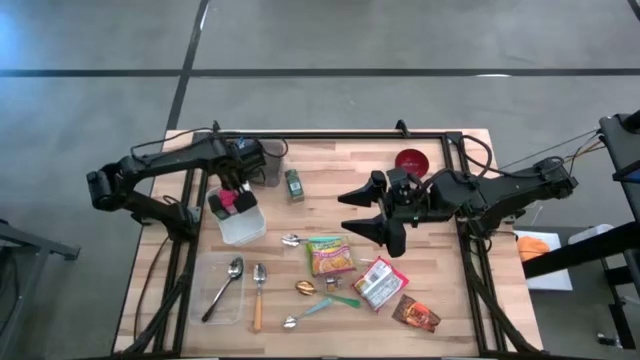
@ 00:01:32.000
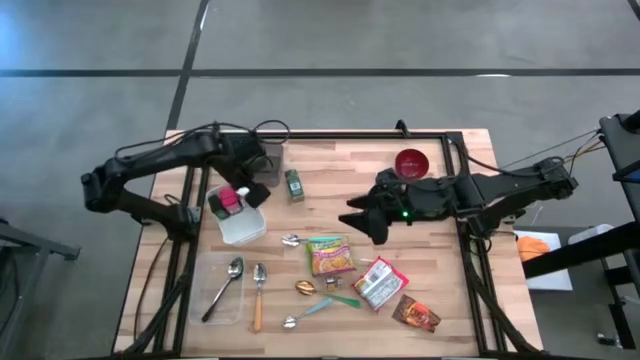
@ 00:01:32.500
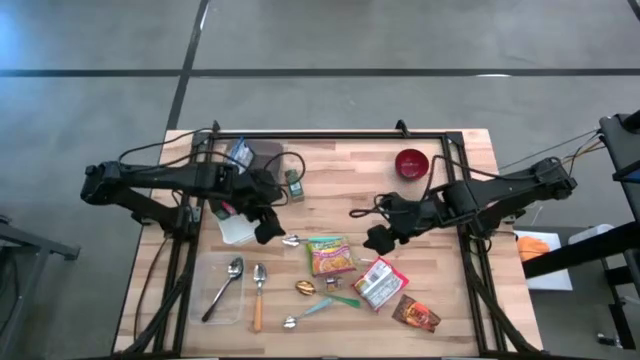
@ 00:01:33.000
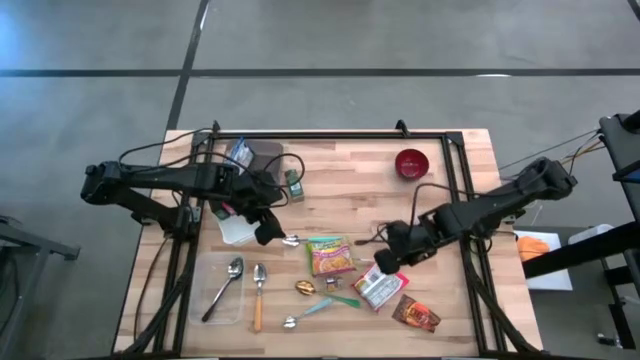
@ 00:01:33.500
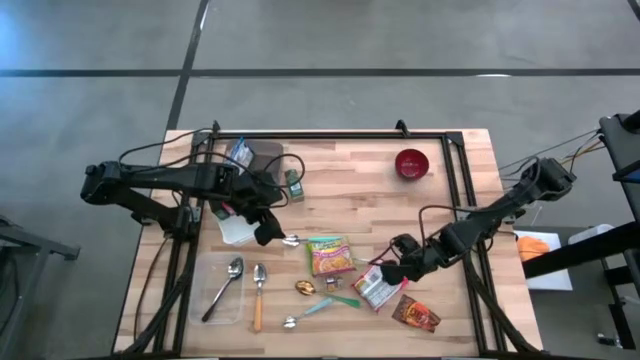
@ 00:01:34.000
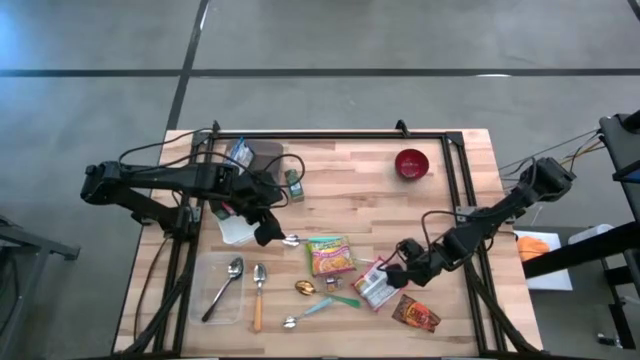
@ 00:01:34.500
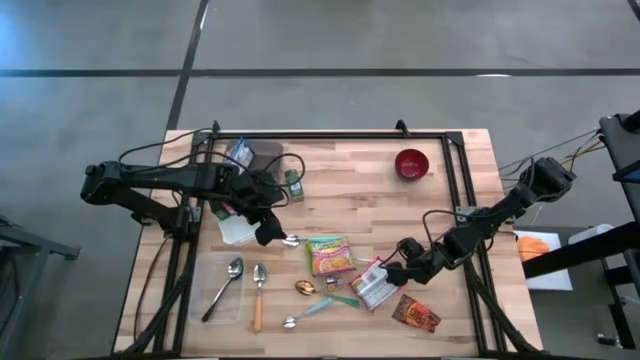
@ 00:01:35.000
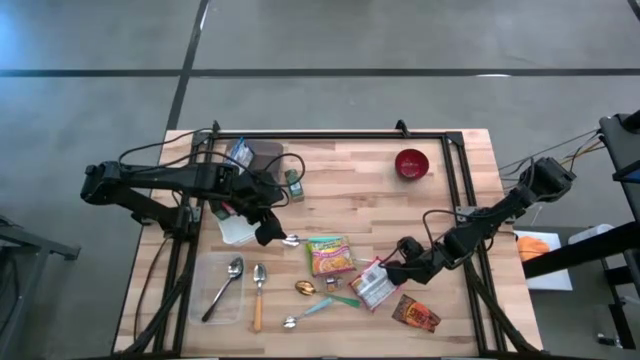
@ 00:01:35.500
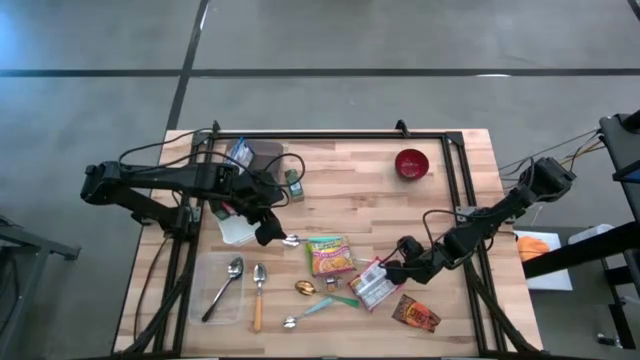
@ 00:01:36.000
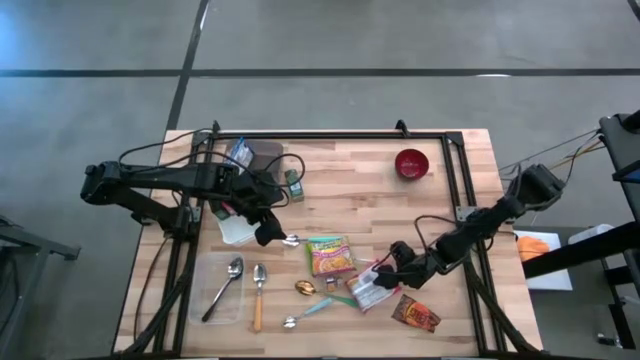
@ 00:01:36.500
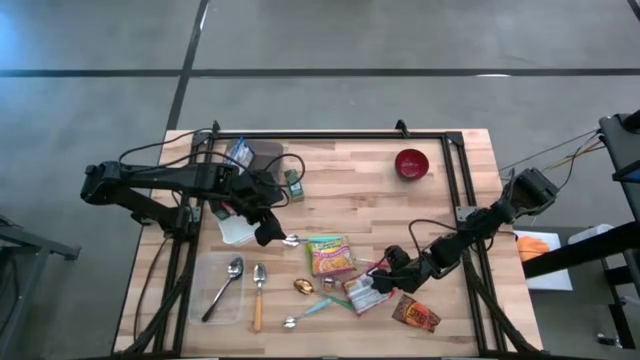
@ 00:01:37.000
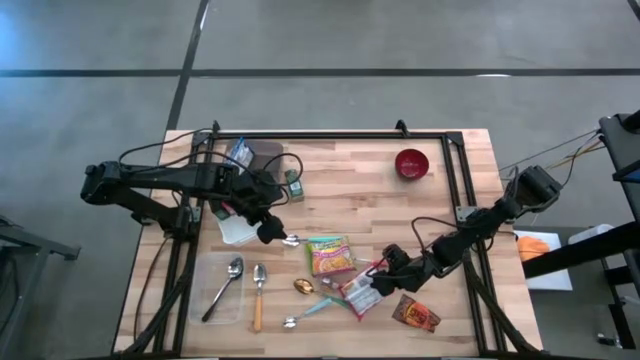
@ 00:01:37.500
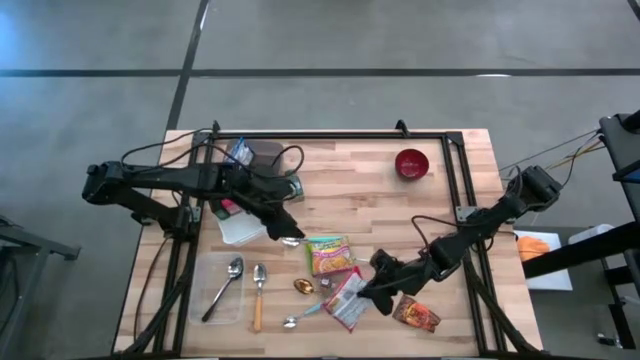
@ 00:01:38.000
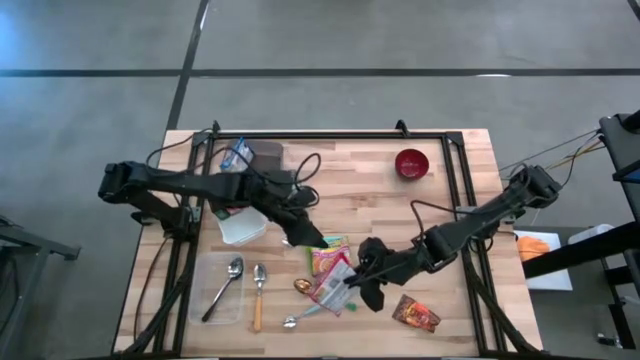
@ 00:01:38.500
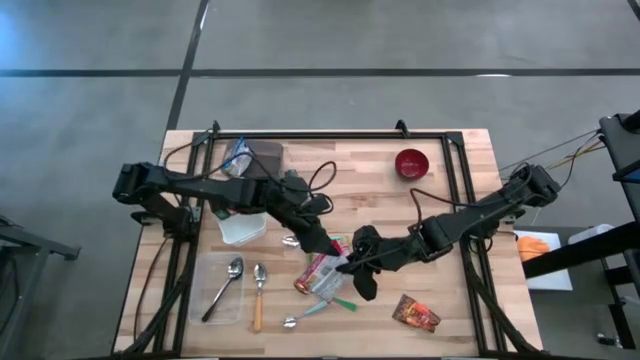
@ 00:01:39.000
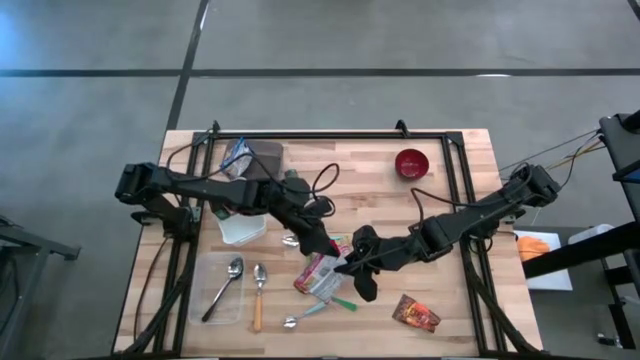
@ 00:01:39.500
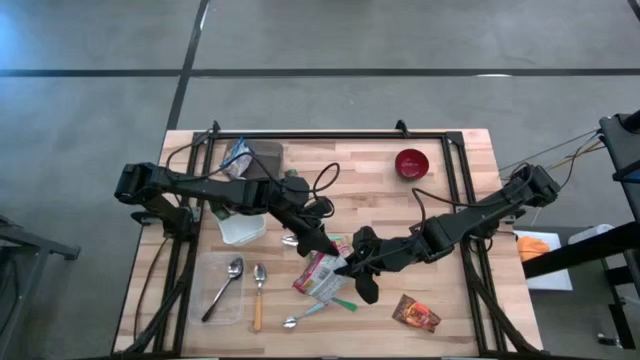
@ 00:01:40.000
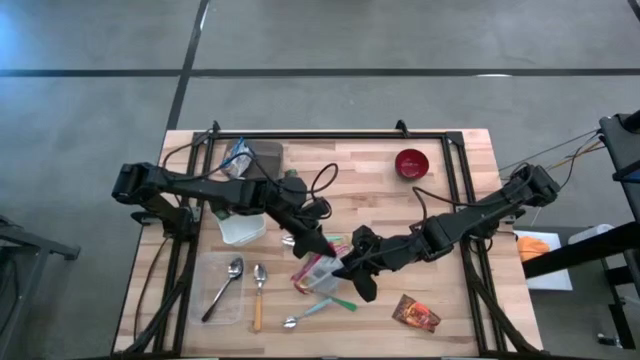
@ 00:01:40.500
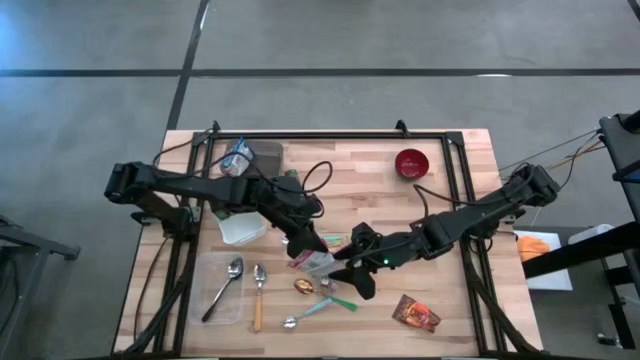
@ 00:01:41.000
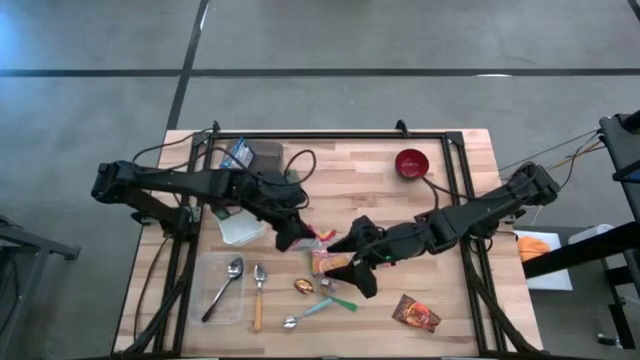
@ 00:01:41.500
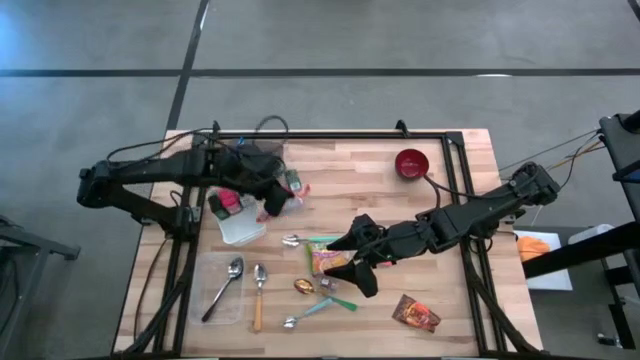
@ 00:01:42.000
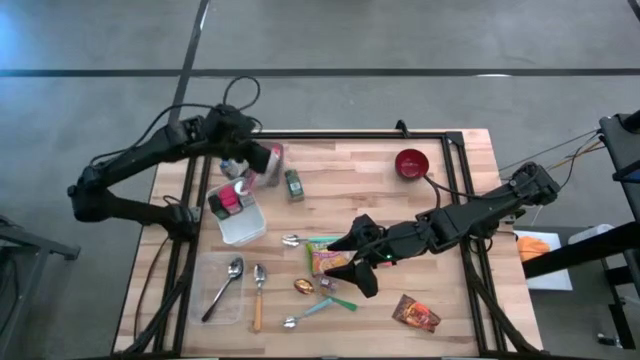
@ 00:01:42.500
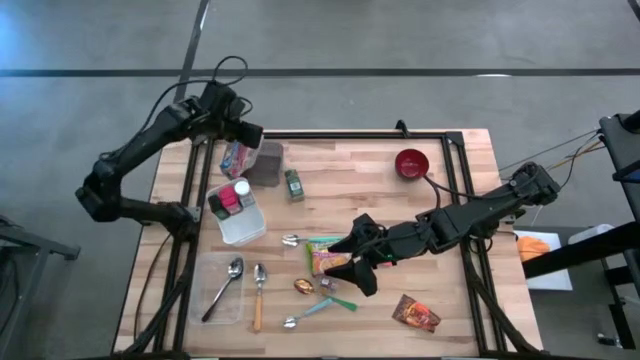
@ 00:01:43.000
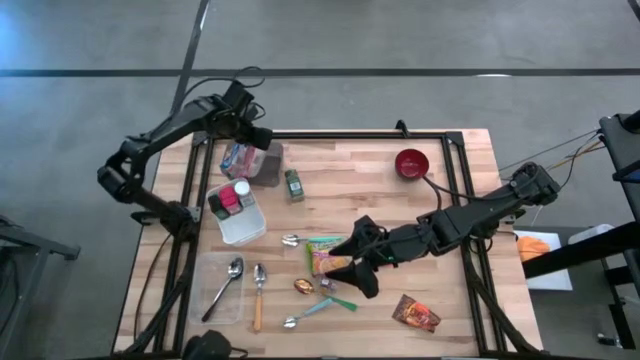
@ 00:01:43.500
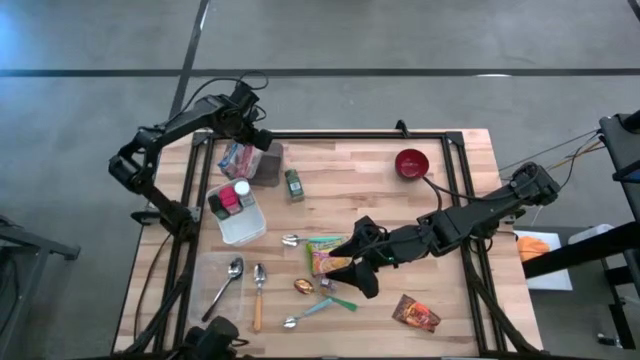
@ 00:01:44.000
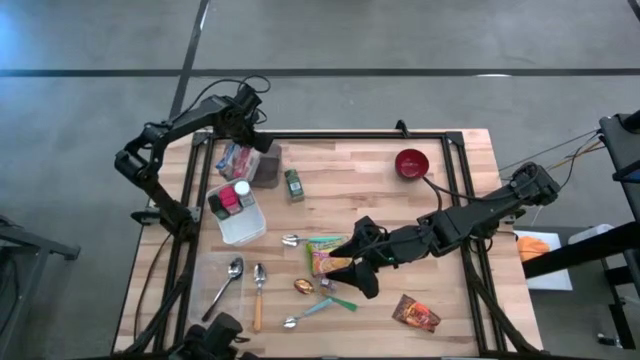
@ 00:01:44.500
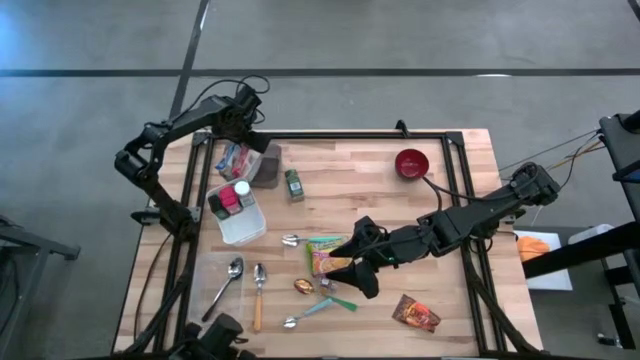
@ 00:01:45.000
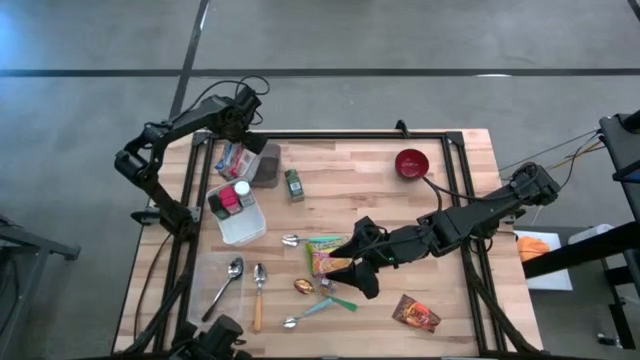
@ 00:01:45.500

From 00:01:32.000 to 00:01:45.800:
Put the orange noodle pack into the black bin
